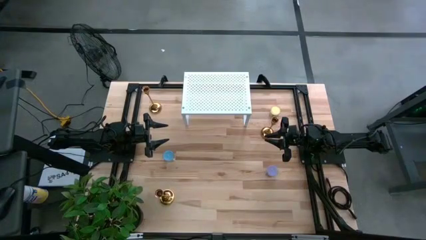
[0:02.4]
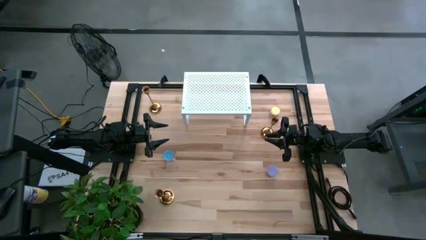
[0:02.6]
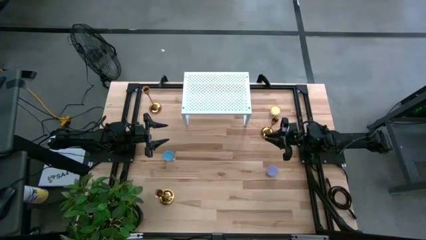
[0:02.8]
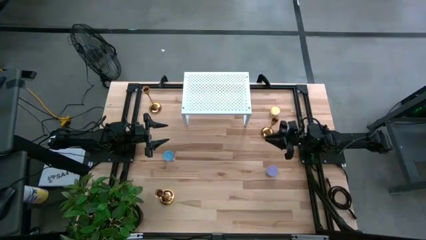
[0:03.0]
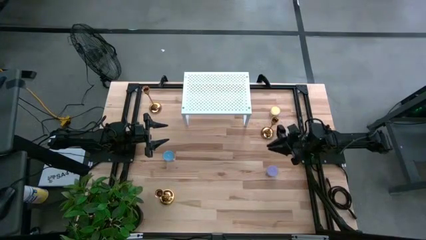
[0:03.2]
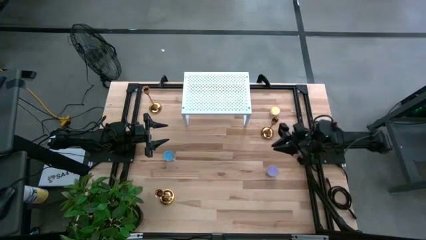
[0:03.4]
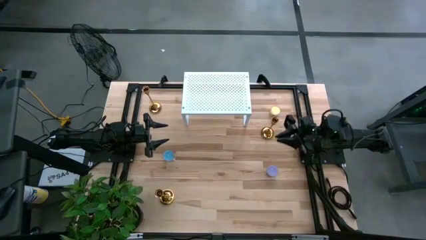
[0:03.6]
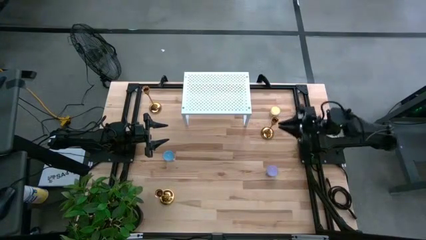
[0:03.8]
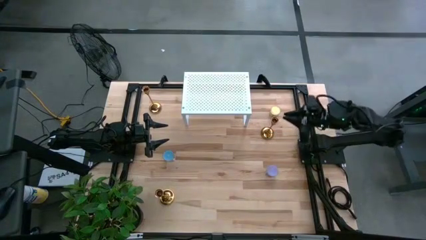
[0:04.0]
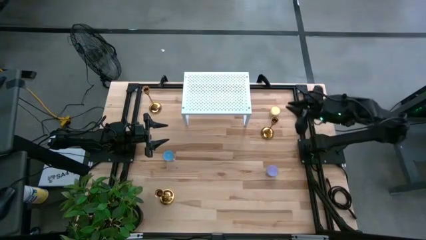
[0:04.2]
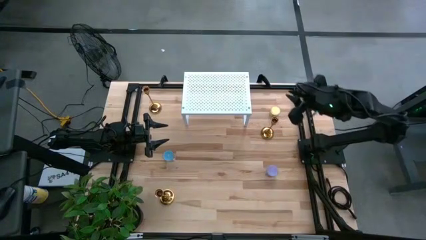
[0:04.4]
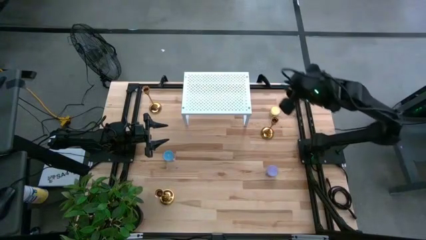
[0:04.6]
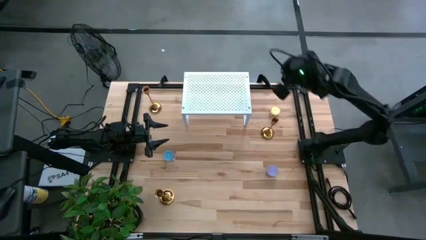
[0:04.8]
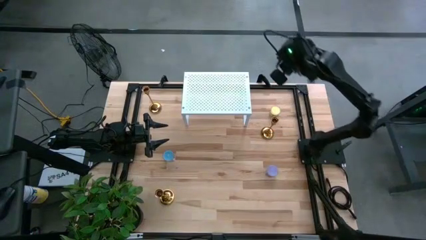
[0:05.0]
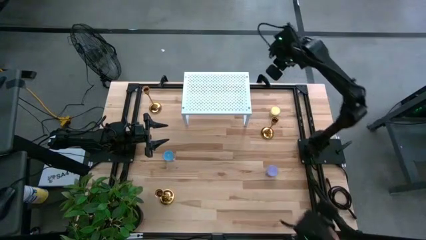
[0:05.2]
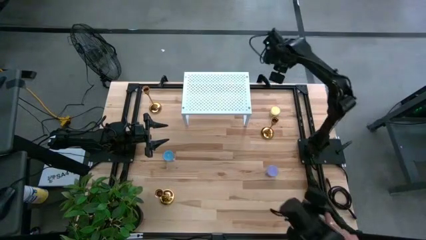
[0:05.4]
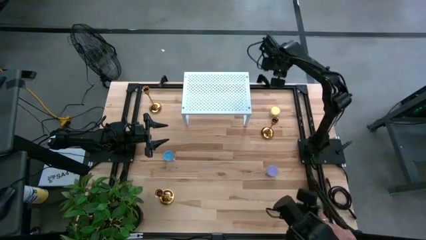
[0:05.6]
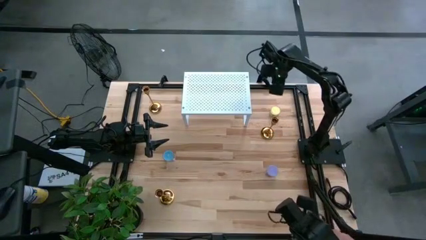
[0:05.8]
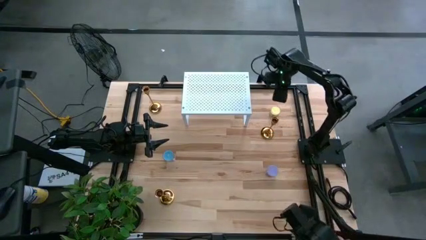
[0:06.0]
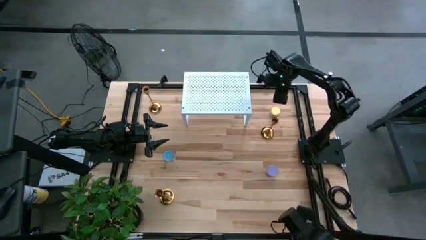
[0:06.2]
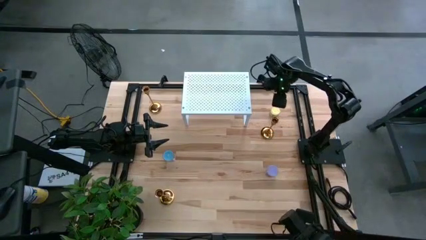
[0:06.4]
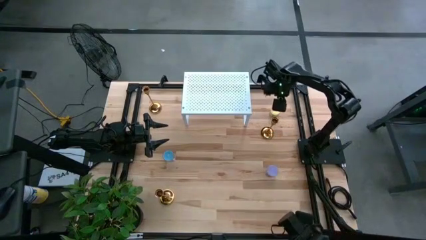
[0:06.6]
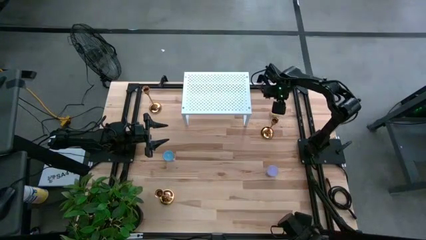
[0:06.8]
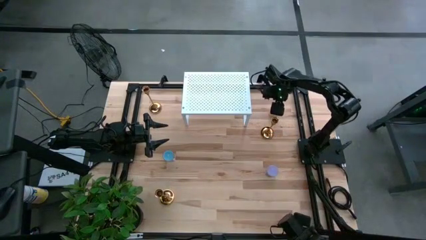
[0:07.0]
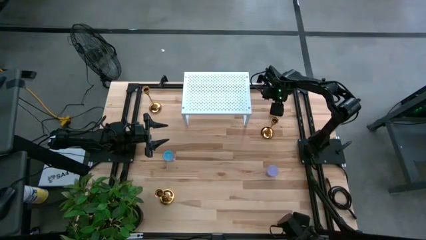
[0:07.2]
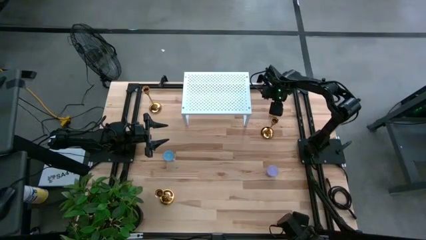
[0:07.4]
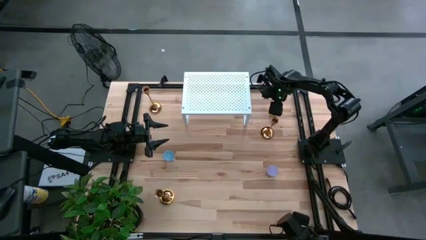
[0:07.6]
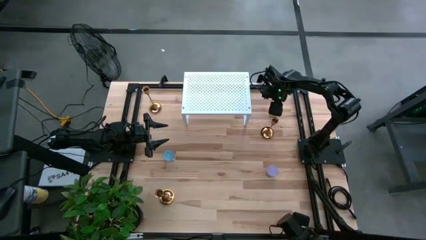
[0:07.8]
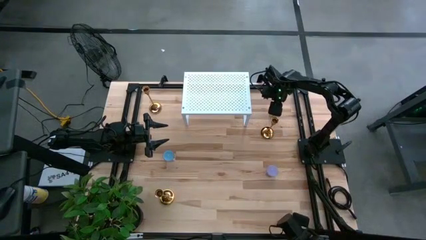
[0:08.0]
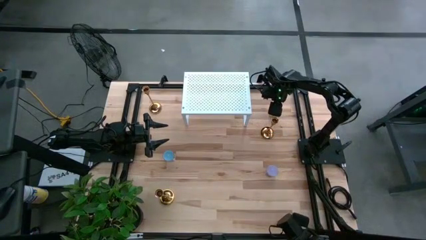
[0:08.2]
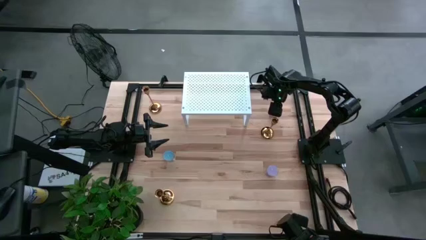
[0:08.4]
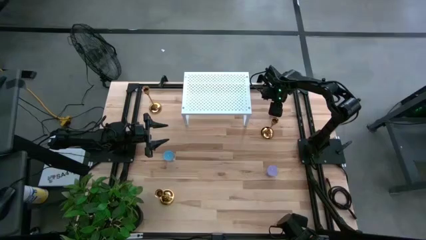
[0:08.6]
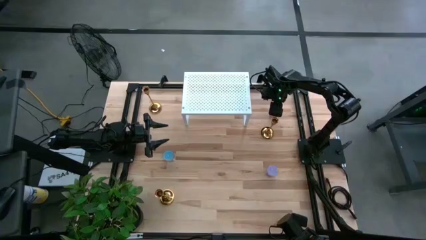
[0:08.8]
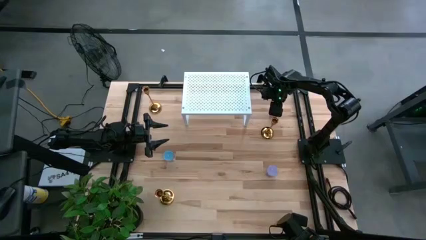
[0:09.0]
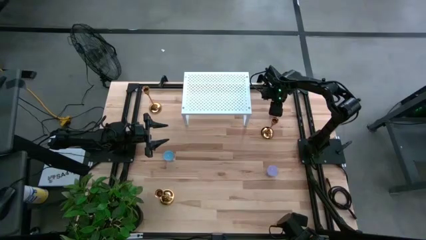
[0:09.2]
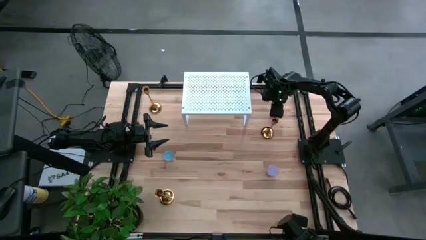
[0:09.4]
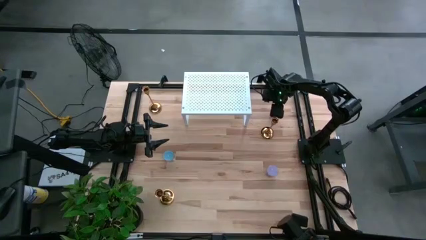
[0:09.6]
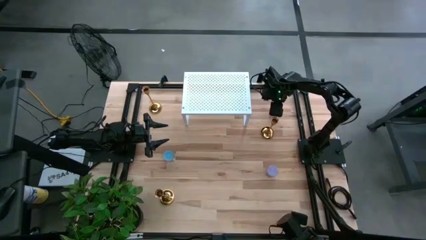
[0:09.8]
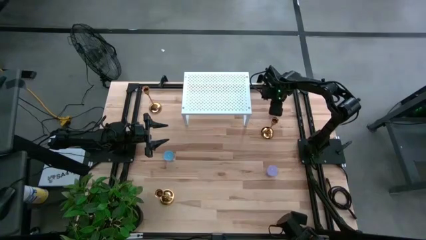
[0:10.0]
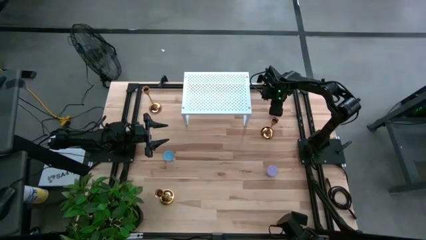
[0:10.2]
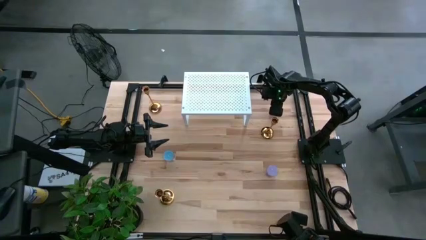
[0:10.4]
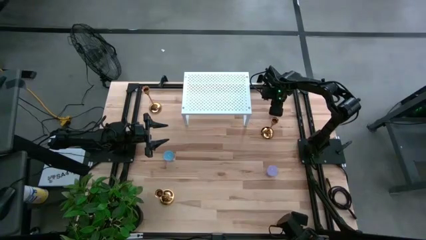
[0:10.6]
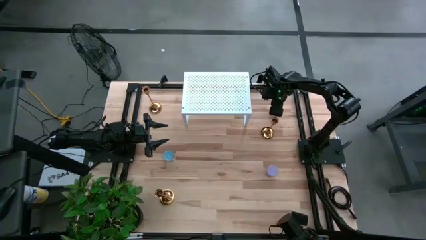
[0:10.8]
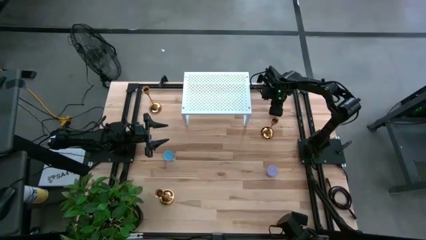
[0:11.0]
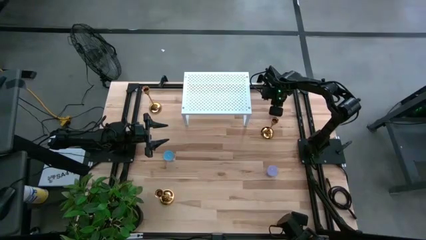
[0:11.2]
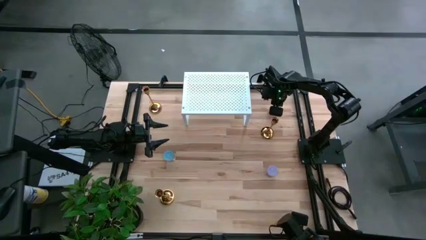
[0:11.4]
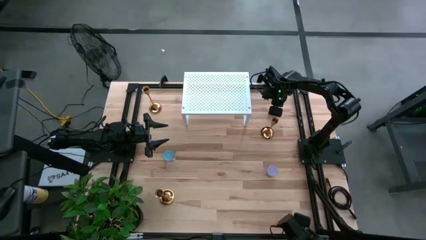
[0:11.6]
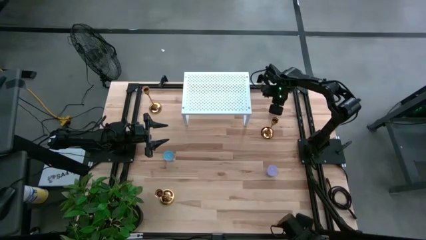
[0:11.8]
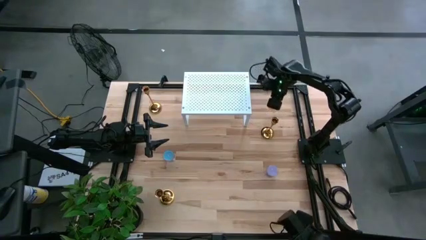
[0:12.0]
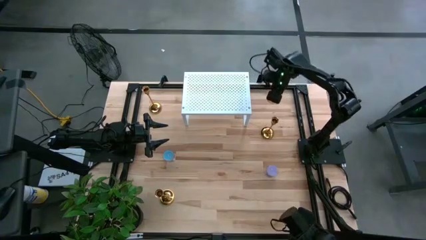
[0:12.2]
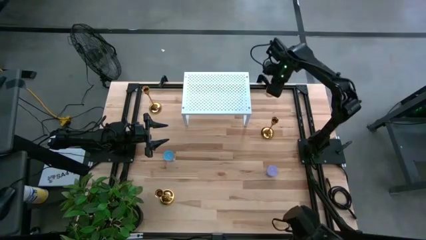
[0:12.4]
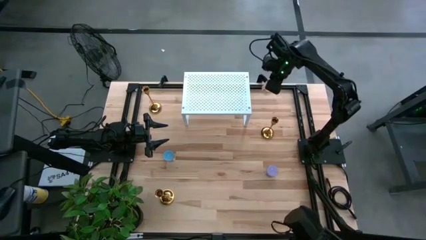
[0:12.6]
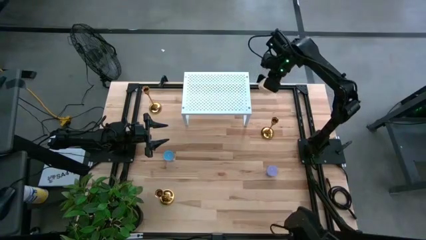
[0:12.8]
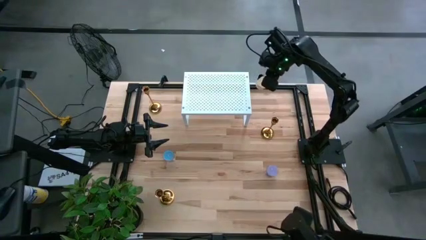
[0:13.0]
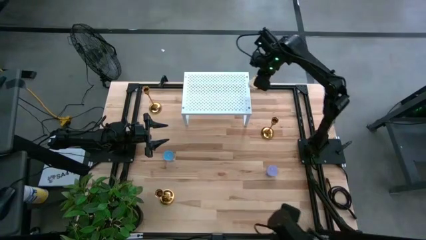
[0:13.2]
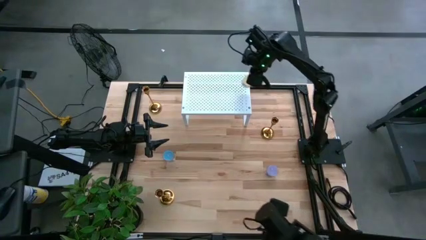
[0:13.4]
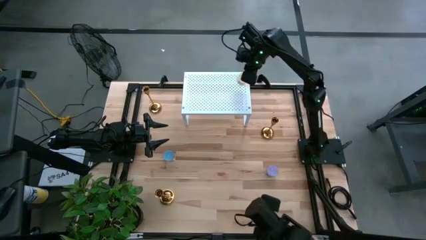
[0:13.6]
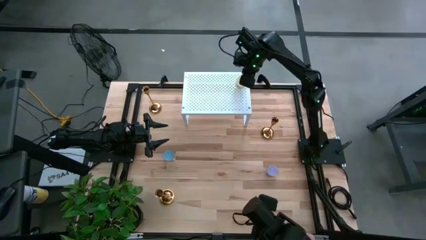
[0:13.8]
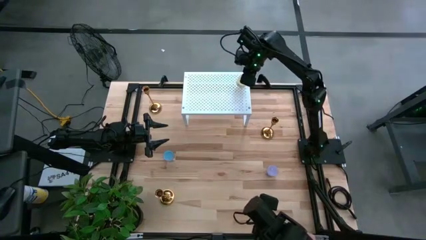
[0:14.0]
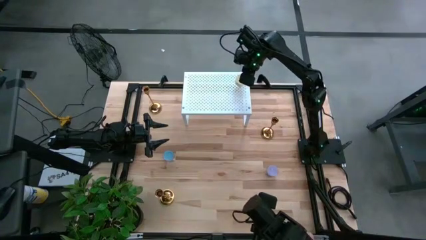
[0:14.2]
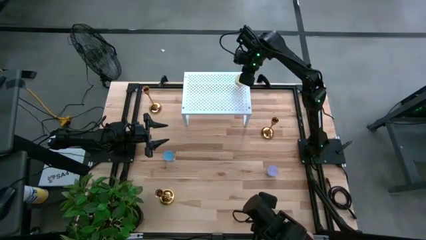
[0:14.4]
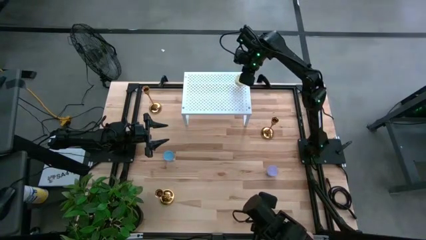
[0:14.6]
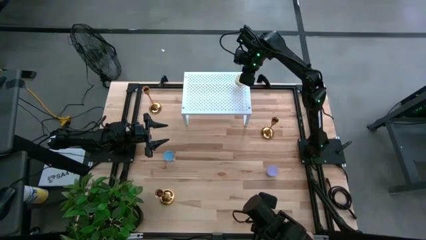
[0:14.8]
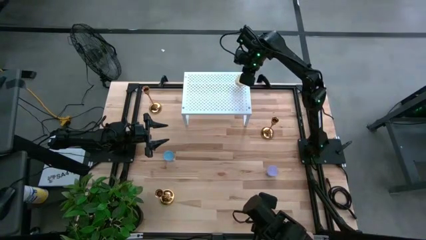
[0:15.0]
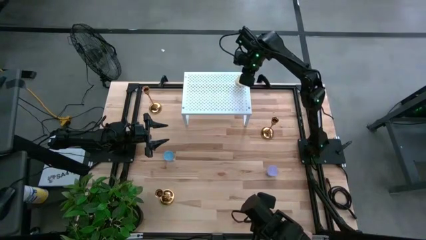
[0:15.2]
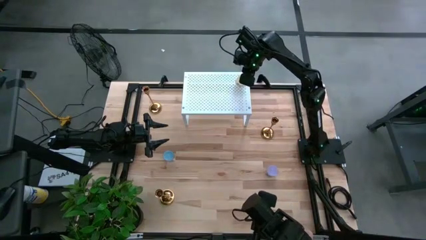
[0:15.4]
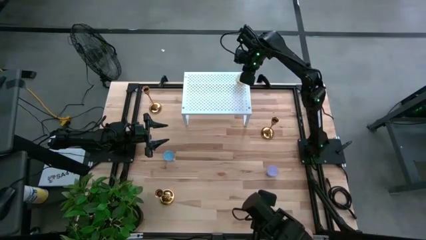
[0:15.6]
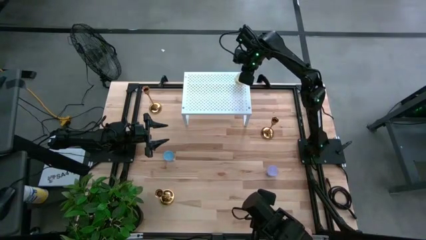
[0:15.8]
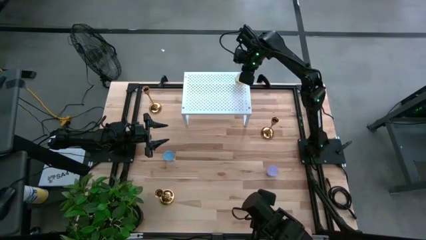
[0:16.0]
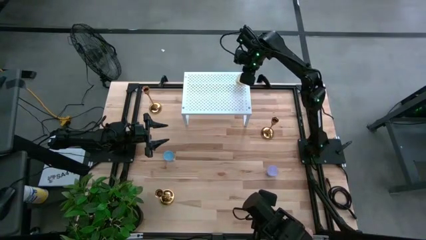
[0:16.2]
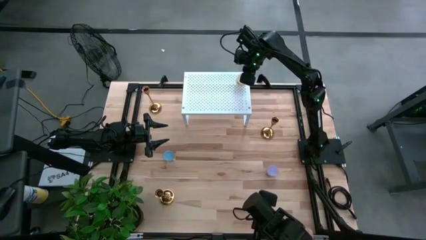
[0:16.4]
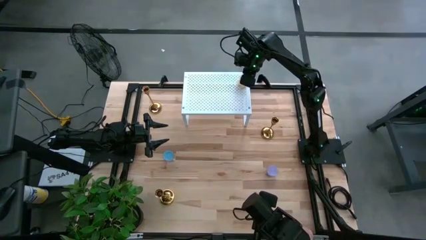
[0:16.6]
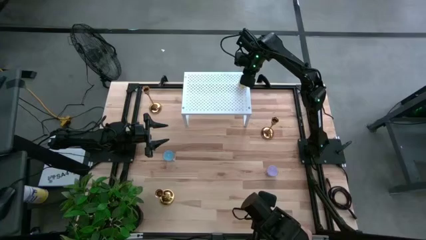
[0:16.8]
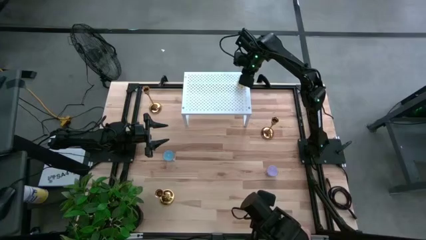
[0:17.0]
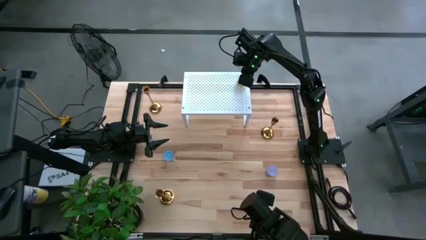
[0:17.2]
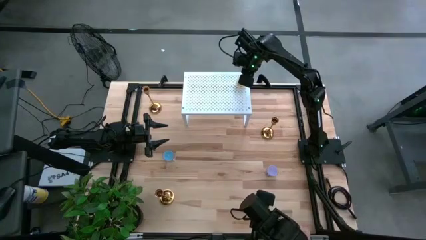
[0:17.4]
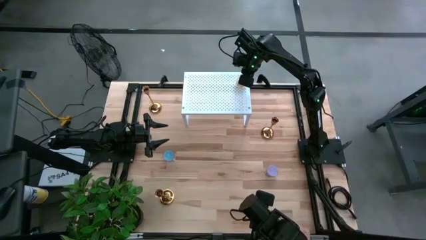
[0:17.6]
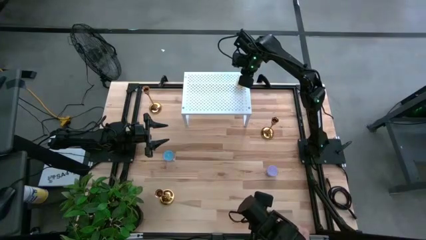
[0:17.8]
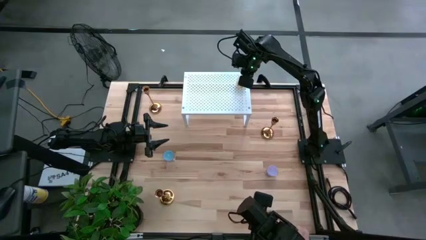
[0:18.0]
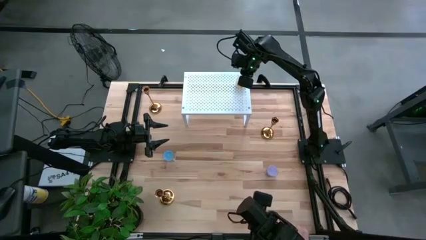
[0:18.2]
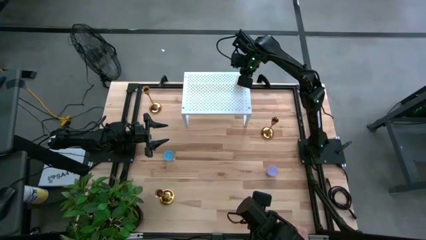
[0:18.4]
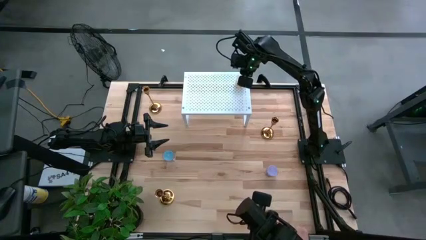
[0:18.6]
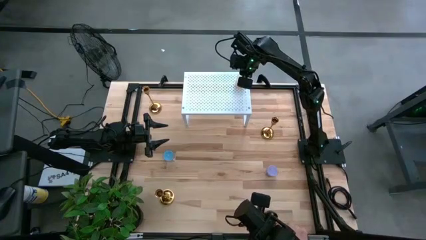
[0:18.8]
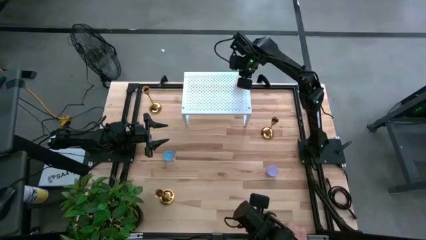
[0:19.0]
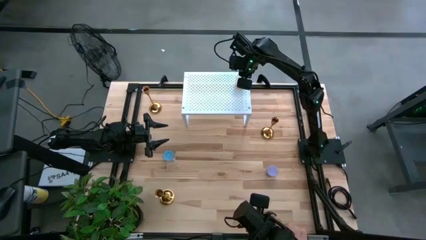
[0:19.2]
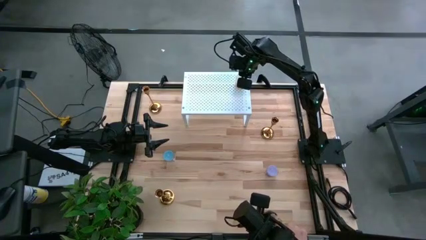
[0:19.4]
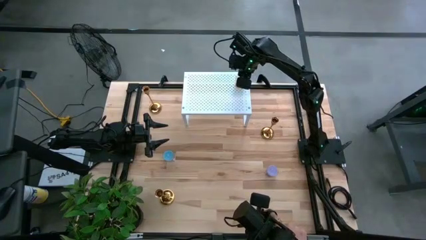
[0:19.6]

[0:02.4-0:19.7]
Task: Pick & Place candle stick holders
Put the yellow scented candle on the shelf
